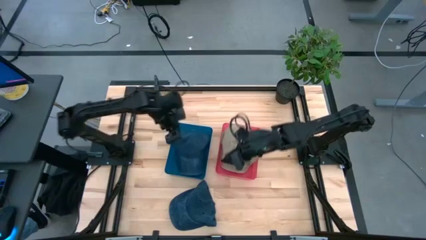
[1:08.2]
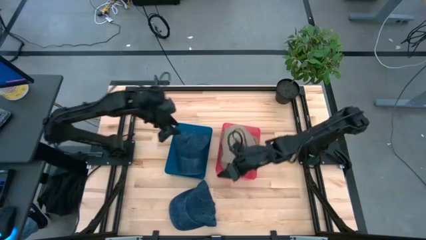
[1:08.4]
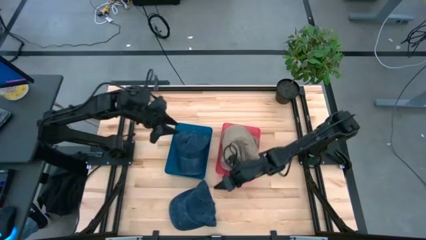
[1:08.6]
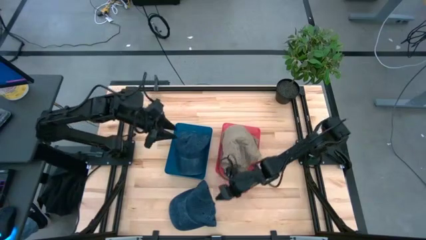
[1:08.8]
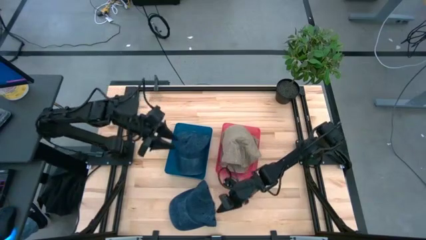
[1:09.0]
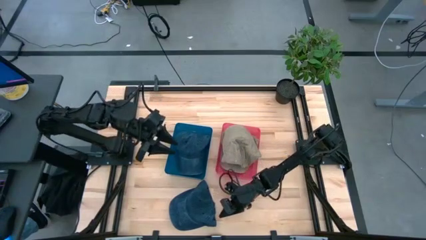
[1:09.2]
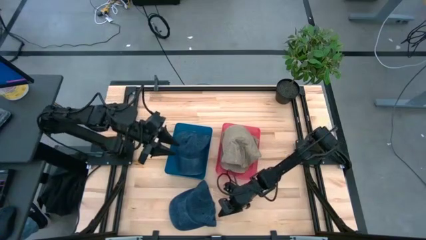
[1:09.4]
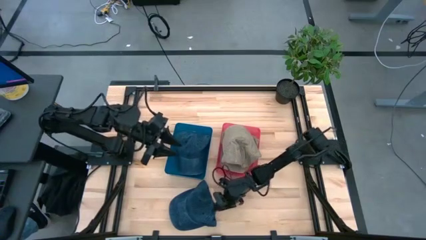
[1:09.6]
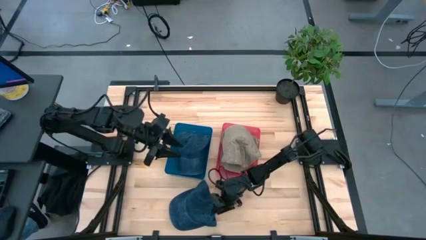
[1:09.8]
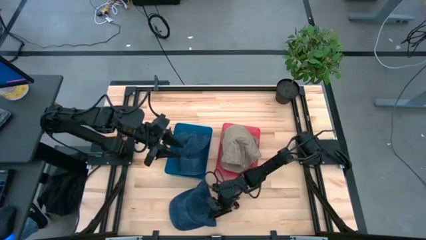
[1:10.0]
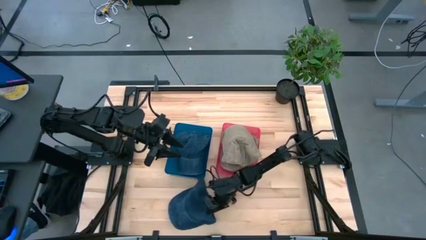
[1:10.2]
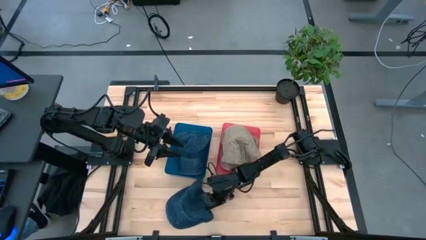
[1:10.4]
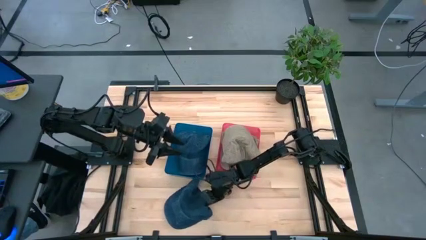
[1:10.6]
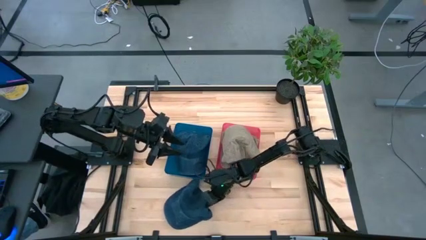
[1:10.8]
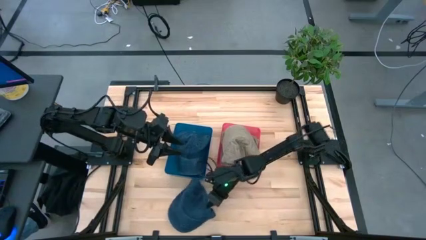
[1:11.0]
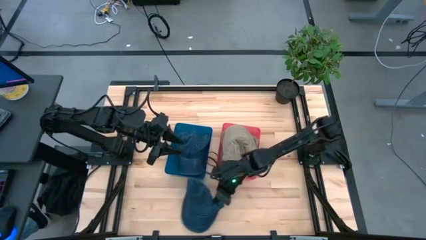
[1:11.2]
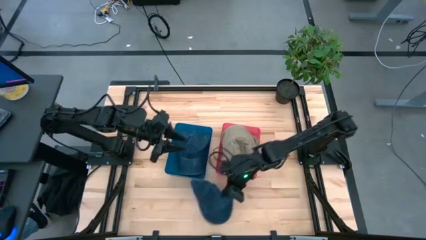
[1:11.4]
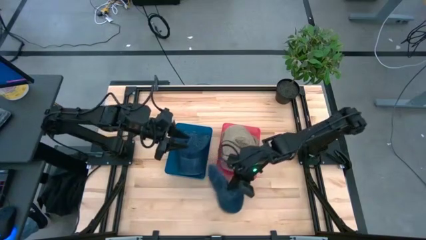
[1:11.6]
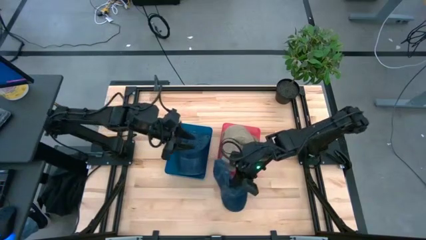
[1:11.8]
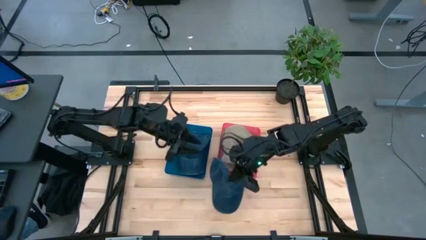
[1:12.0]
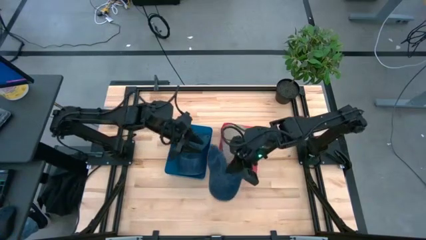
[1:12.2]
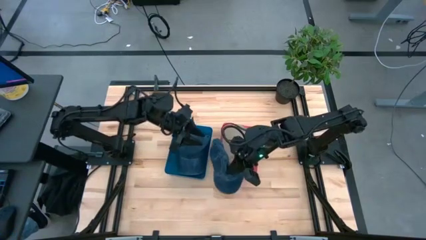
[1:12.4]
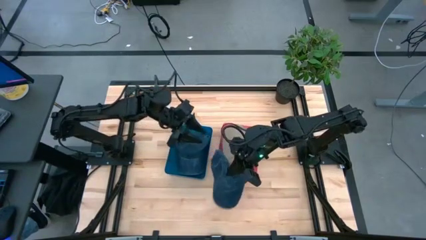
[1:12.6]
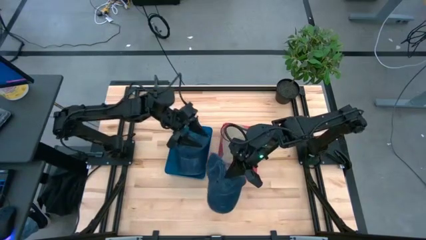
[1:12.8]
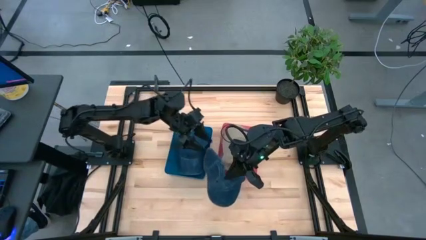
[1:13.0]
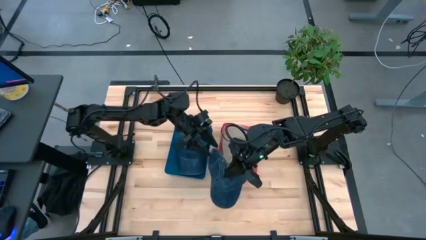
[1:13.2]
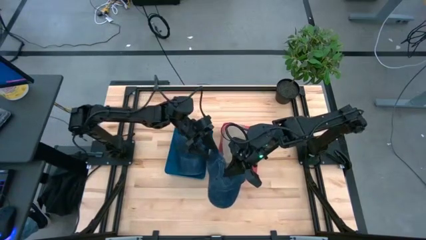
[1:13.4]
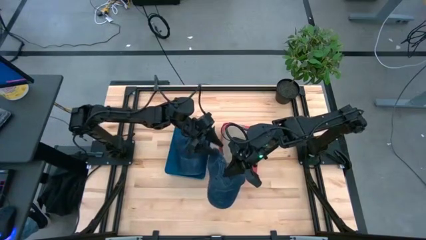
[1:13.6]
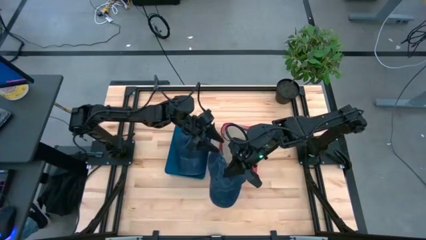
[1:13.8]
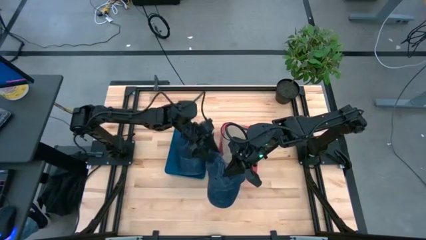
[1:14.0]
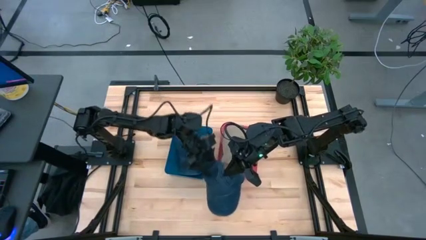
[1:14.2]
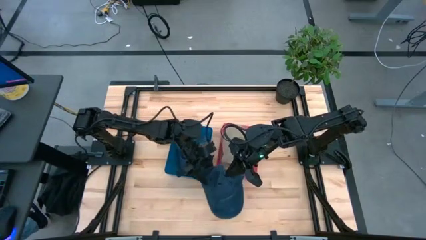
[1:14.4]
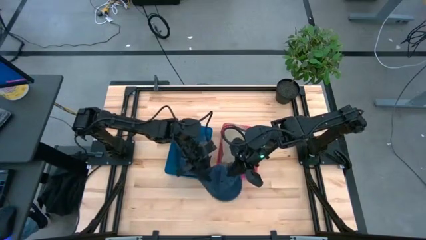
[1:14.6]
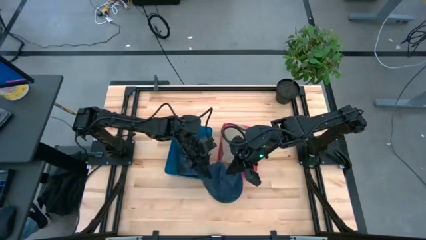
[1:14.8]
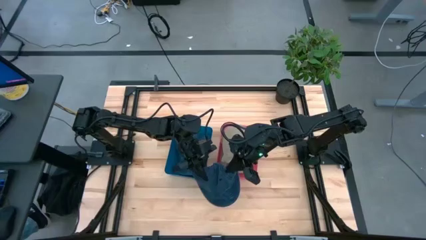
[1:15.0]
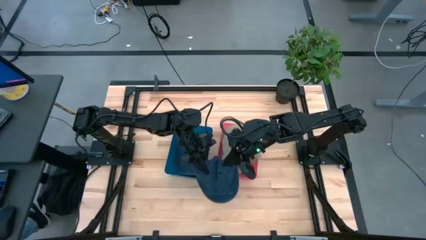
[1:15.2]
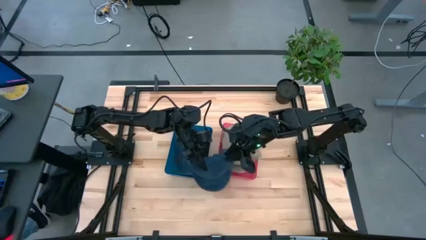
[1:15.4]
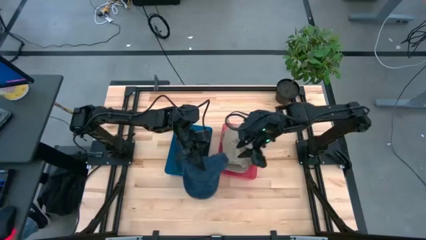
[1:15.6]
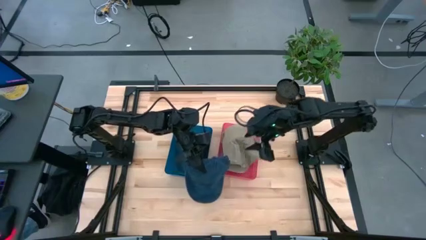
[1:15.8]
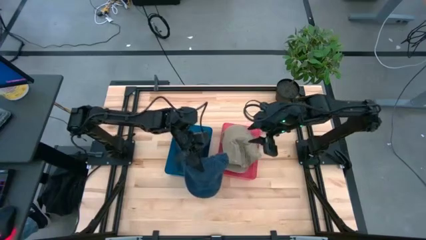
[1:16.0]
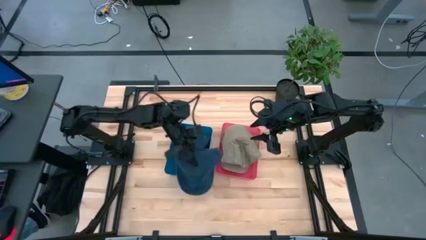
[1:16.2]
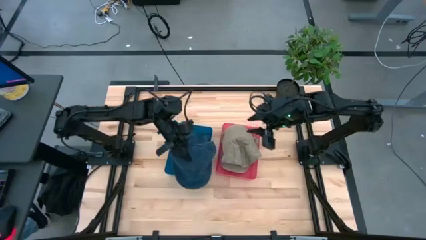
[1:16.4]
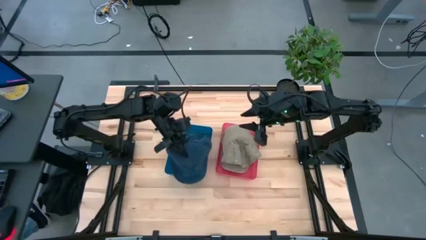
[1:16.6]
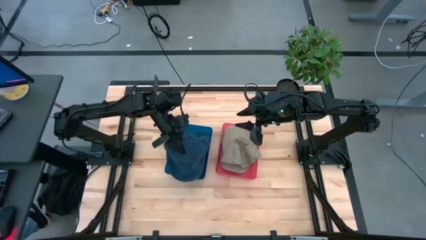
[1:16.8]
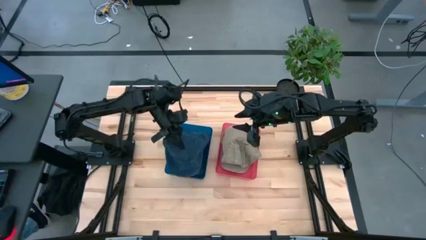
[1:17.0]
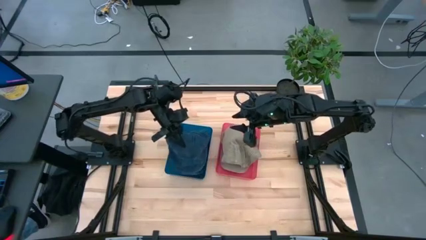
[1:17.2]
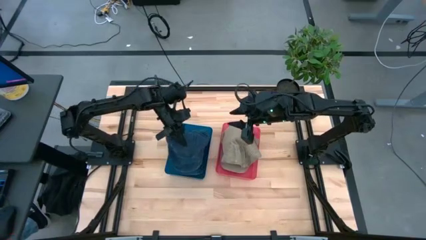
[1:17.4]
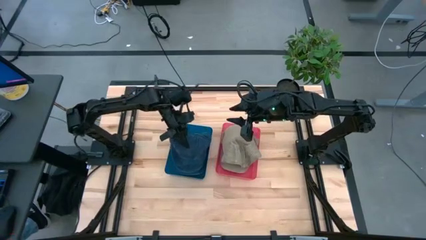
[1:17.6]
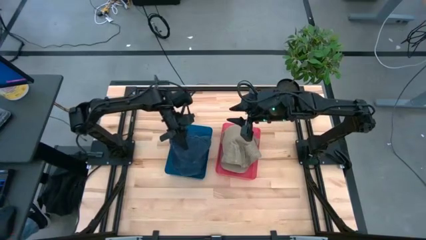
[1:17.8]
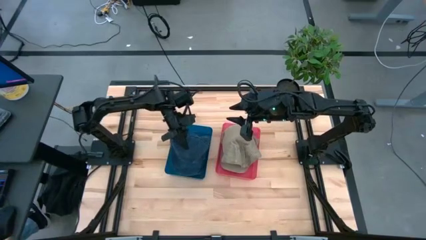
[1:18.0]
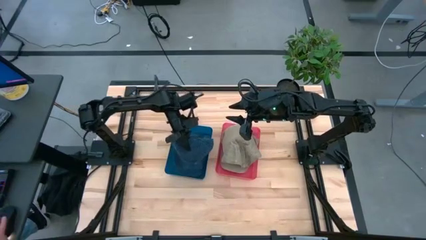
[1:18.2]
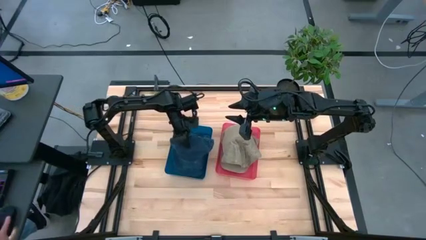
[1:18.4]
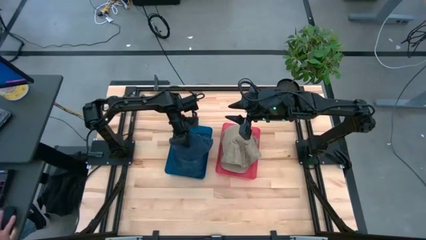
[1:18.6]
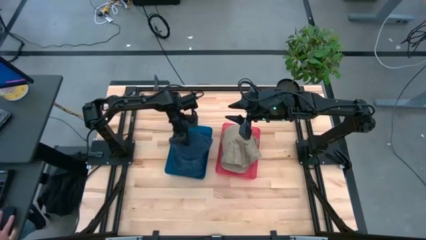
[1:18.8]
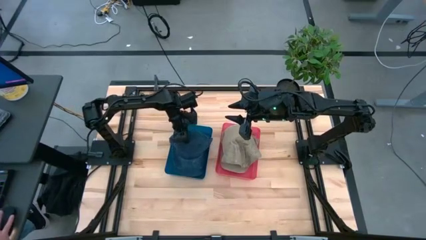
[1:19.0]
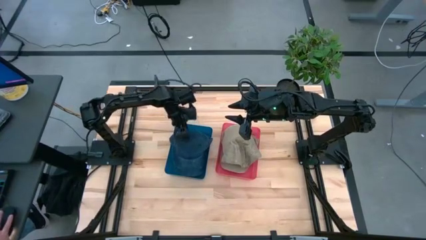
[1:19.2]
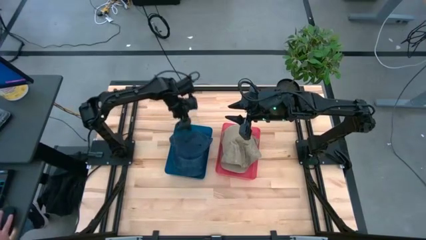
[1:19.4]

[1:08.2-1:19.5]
Task: Pick & Place hat
Put the blue cap into the blue bin

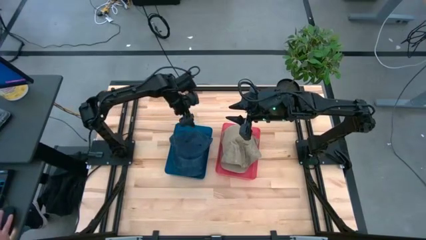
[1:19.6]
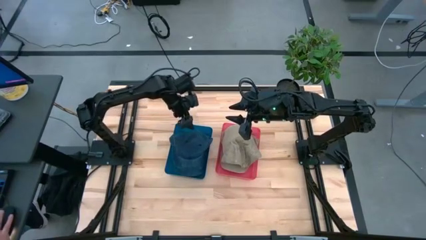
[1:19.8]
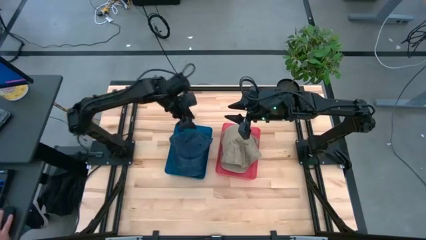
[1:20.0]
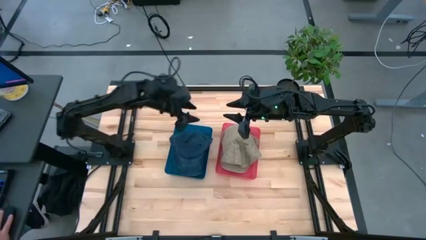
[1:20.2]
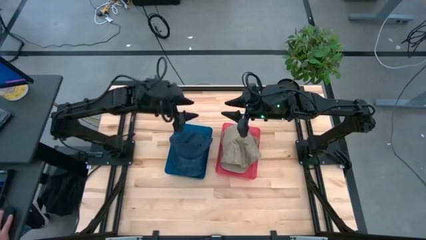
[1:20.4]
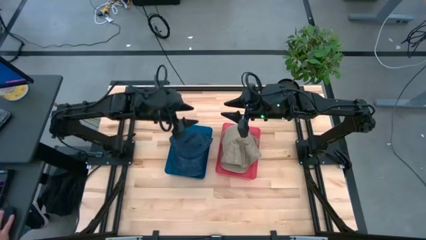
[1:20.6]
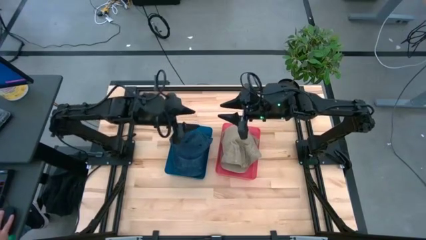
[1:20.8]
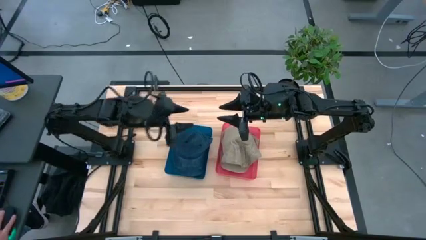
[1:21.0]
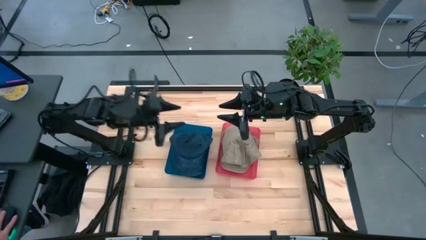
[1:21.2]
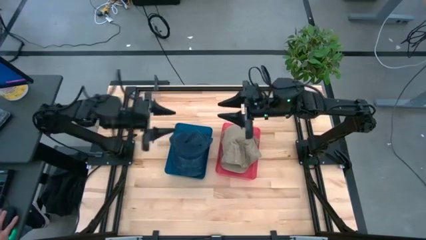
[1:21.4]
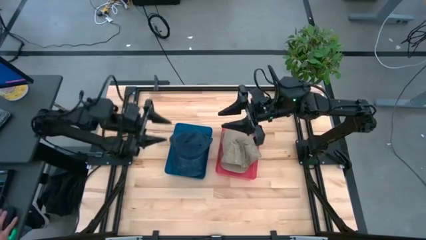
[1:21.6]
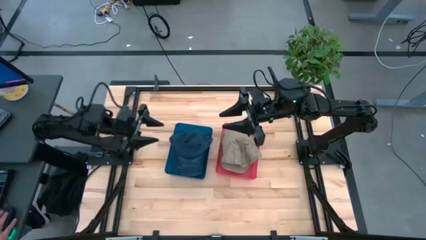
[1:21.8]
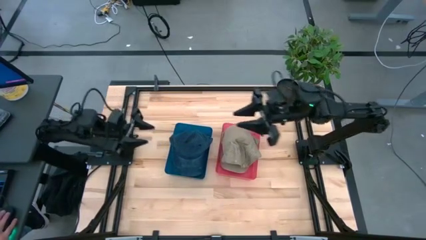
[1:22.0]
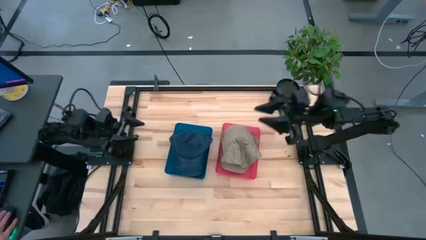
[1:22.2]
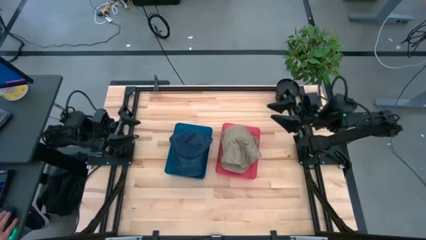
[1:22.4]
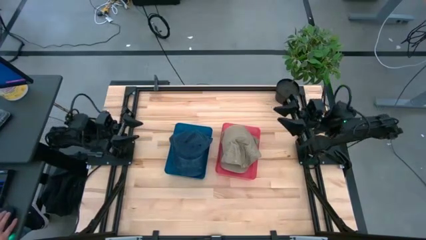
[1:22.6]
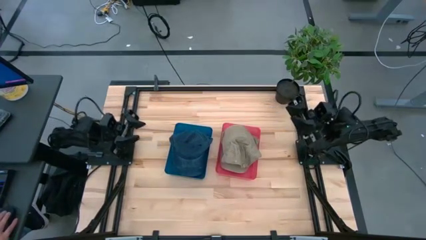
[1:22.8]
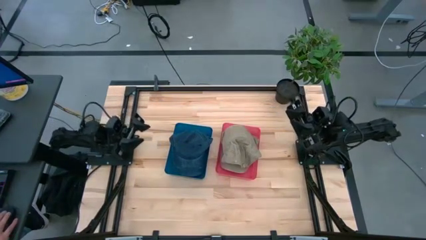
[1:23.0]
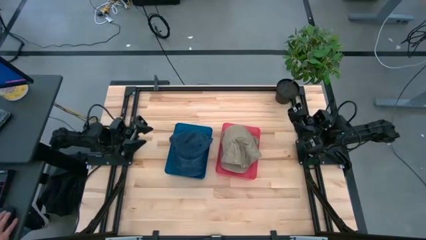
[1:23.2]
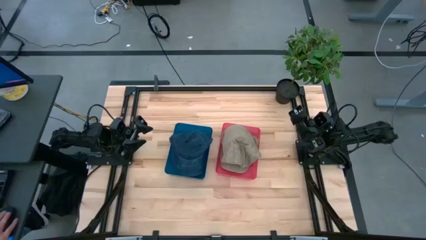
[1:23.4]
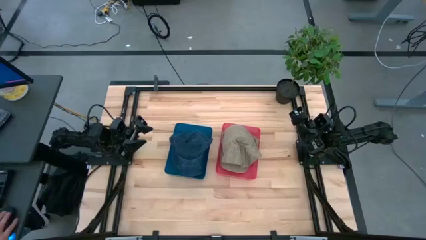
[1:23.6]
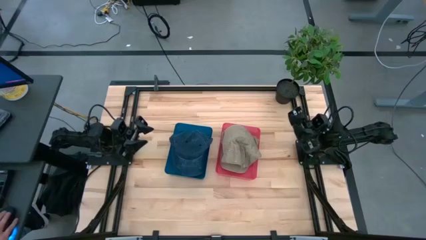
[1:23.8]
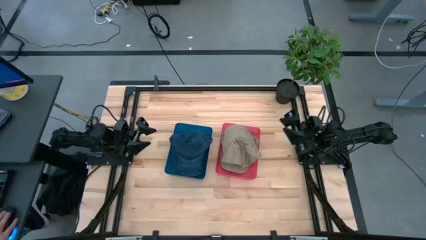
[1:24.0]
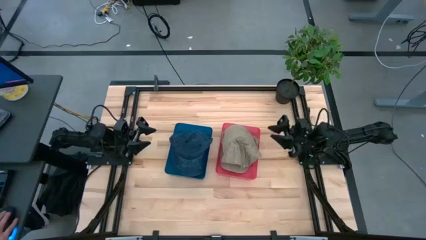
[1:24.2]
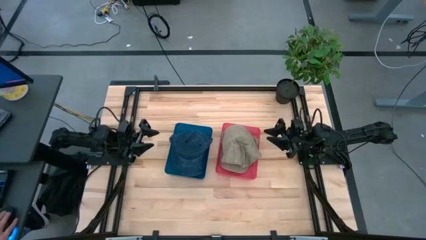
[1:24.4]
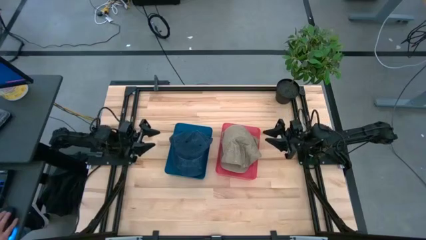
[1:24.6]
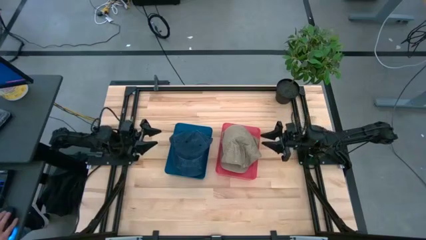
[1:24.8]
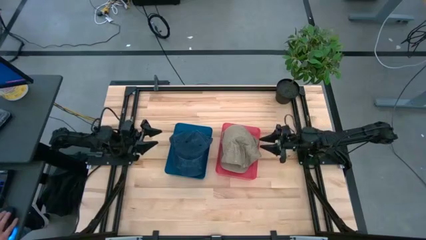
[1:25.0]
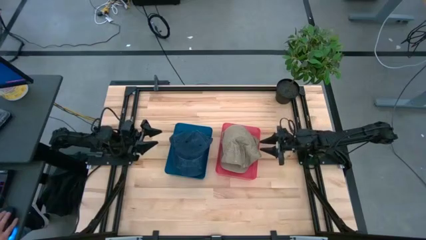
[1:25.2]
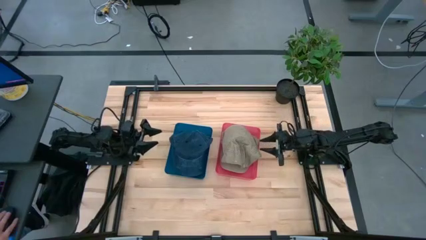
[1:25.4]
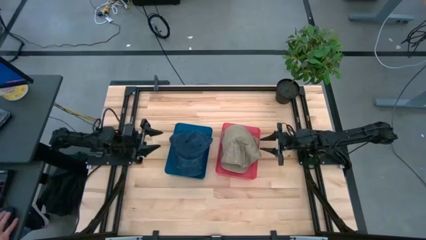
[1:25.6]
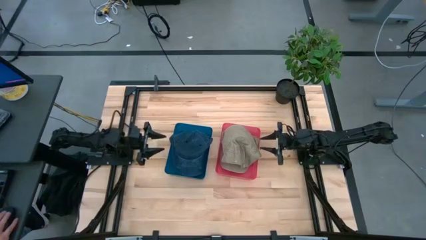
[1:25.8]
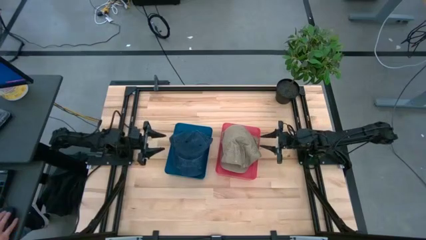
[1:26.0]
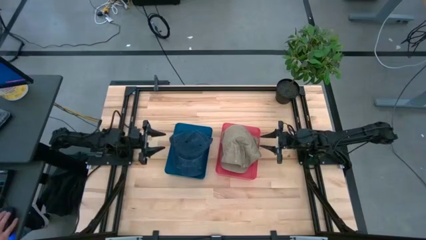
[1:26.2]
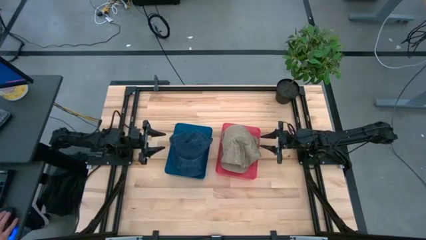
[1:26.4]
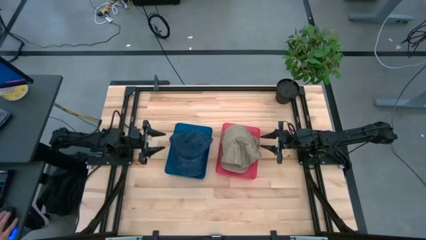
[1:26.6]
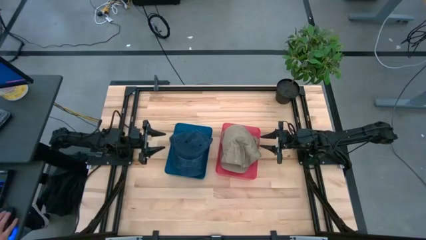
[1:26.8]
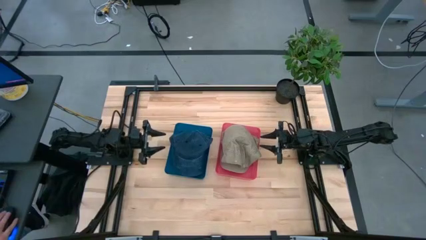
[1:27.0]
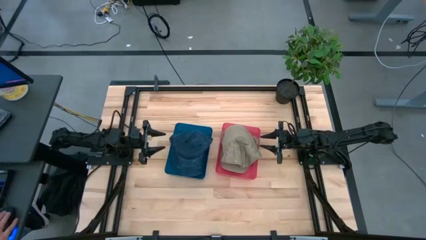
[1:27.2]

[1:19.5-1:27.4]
Return to Home Position
